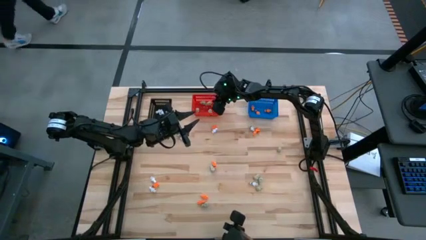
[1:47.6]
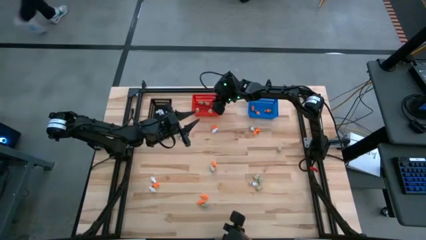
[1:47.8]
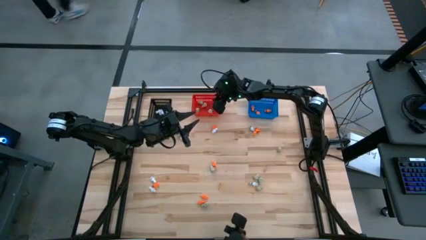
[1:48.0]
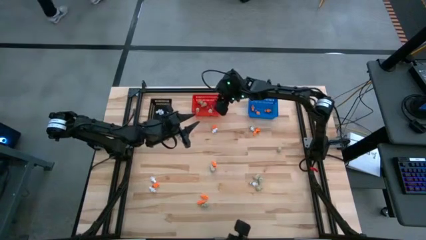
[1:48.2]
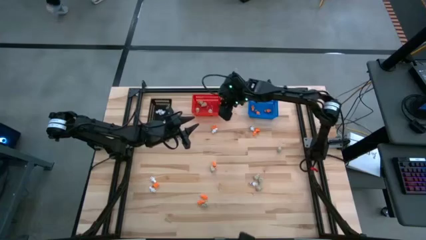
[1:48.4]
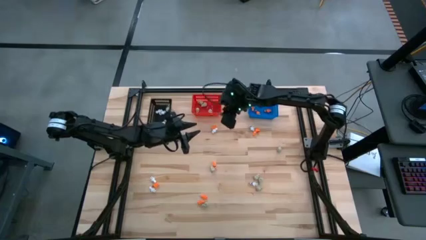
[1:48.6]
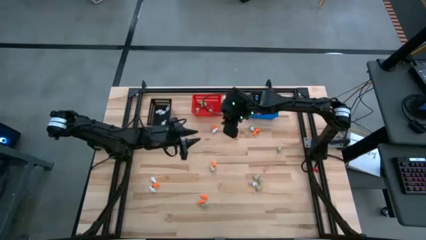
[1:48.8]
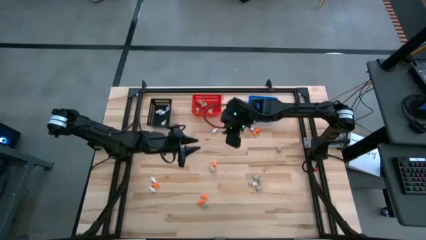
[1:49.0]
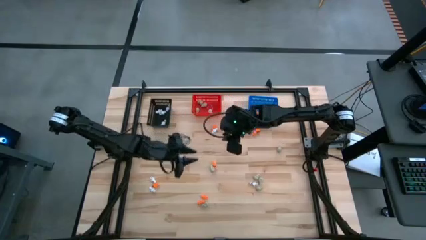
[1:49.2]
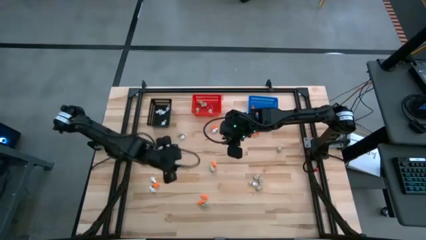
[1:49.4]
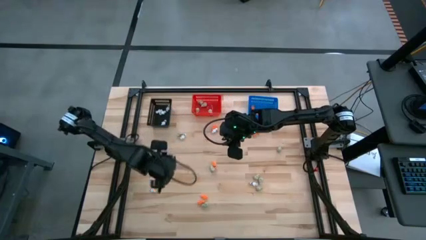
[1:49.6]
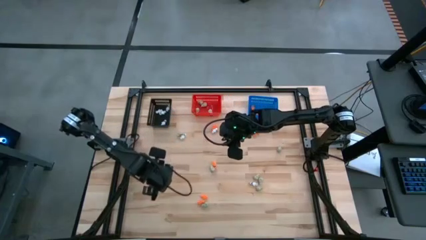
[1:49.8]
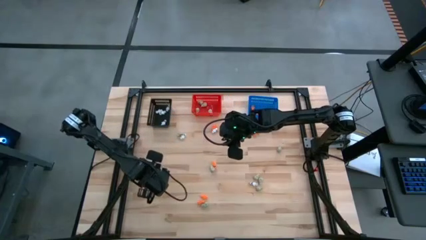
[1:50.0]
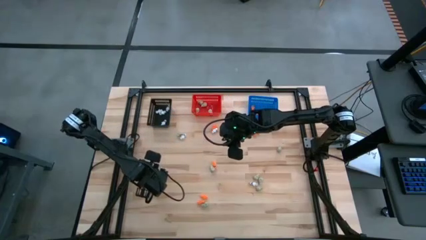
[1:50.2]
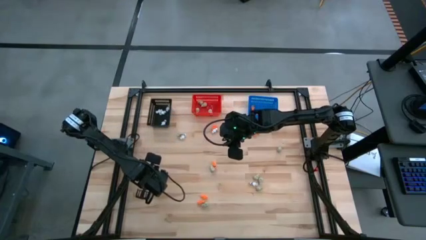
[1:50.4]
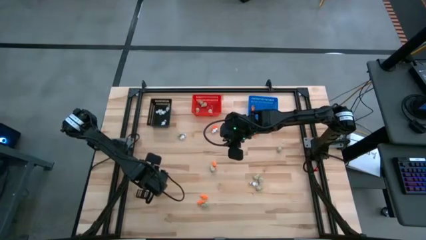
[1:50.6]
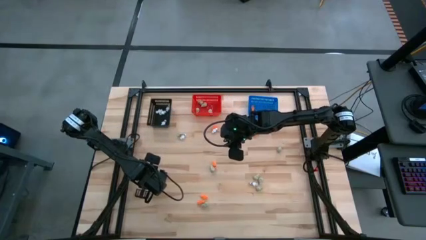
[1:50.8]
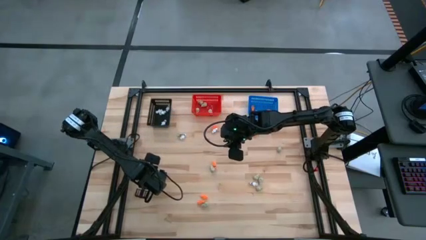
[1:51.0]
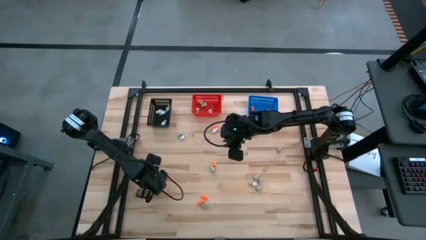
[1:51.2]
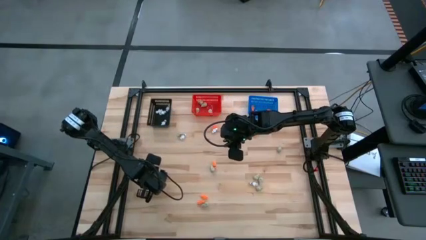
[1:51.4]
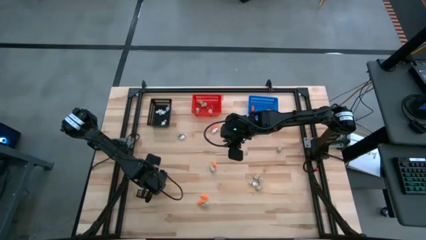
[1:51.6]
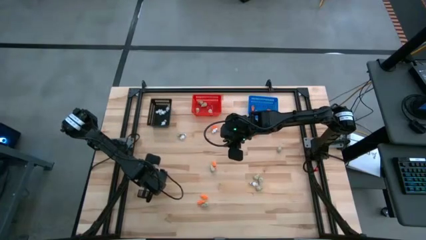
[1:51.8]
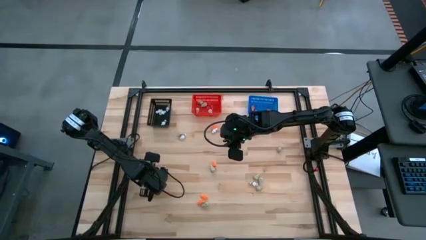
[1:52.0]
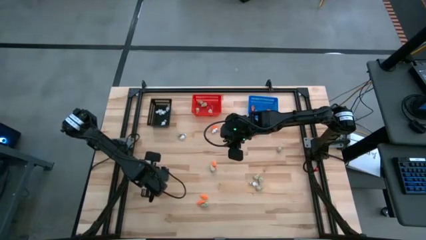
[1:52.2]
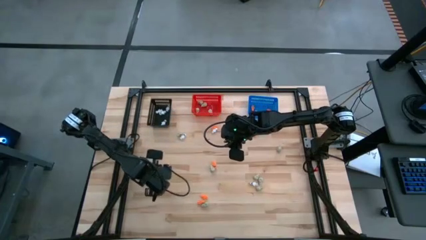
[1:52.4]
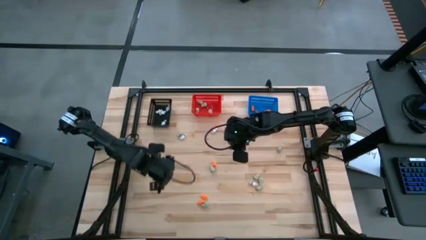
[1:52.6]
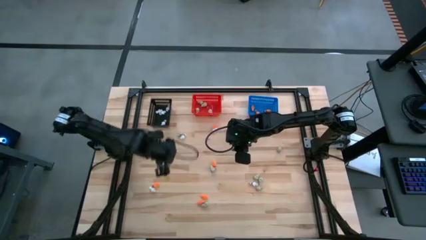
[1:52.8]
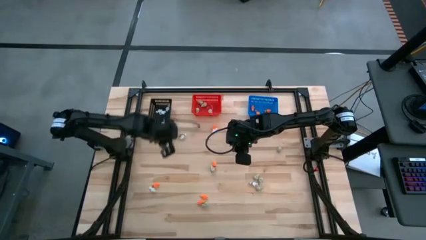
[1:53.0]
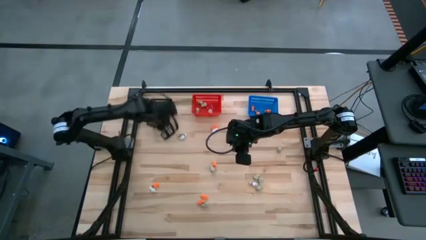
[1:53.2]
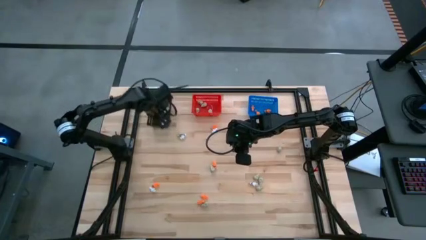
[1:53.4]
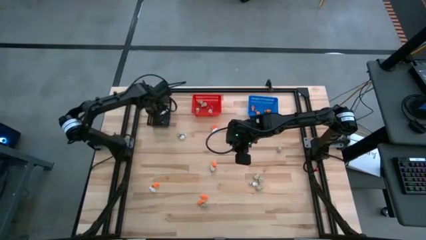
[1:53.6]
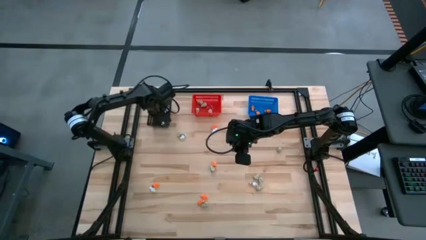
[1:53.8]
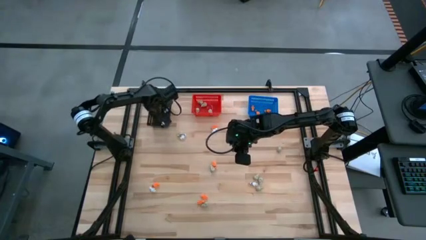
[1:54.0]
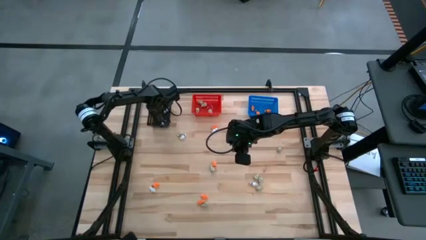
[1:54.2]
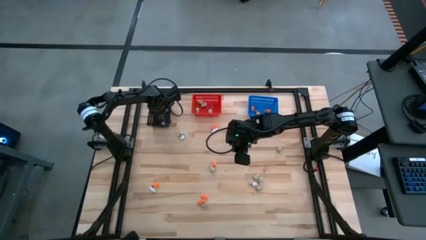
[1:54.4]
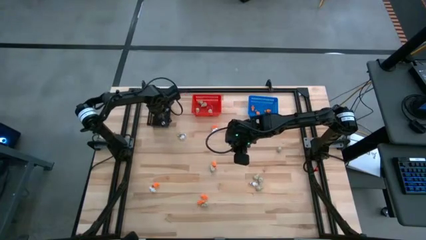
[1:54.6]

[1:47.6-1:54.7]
Task: Sort Halloween decoration
Put the white skeleton toy into the black bin

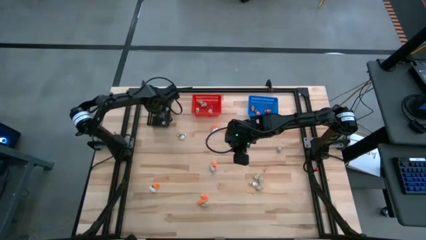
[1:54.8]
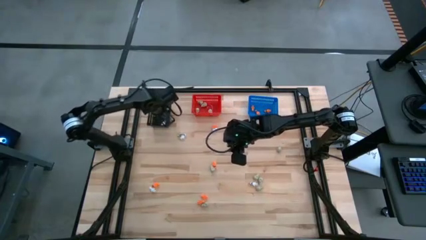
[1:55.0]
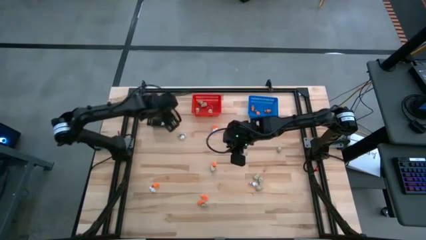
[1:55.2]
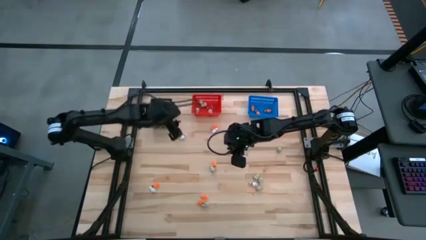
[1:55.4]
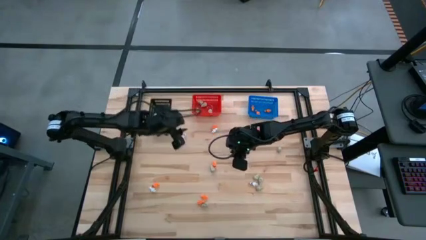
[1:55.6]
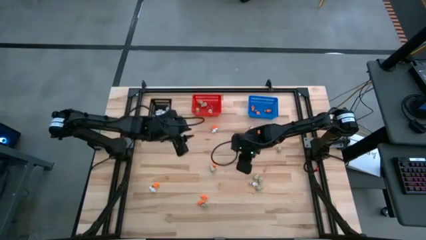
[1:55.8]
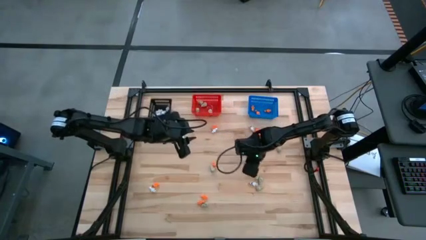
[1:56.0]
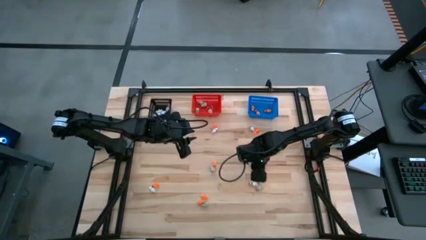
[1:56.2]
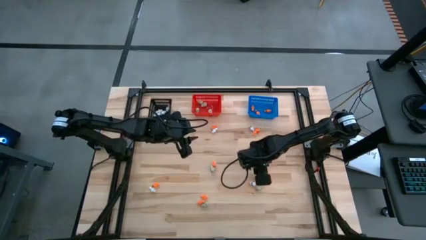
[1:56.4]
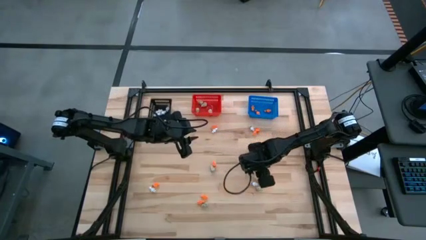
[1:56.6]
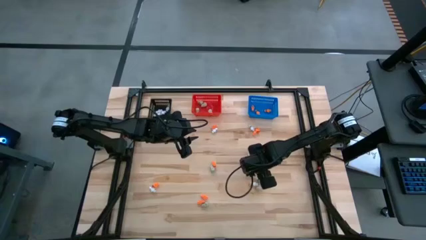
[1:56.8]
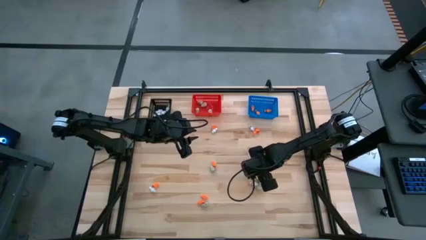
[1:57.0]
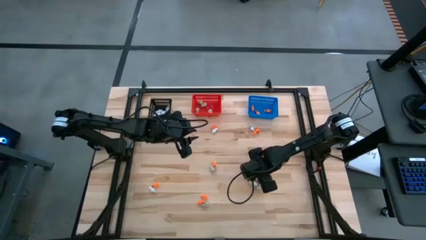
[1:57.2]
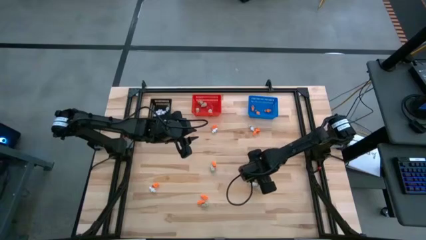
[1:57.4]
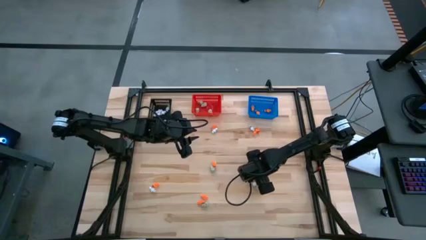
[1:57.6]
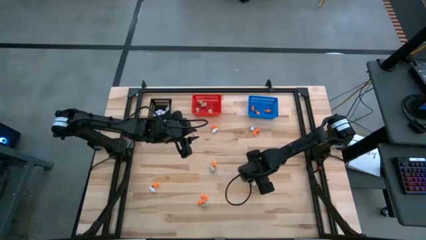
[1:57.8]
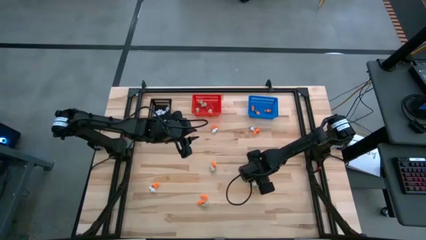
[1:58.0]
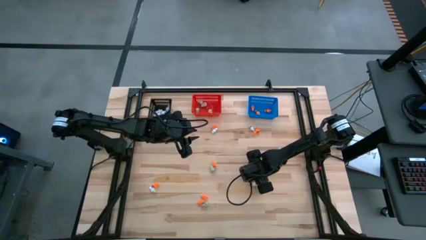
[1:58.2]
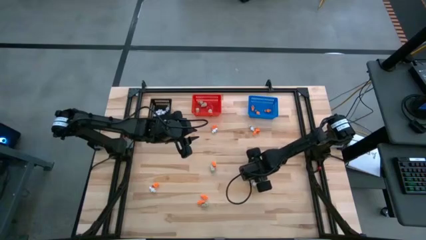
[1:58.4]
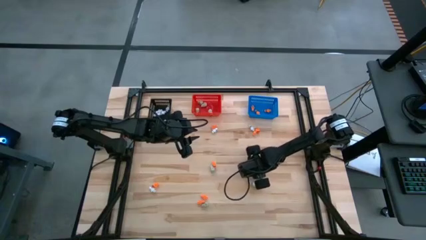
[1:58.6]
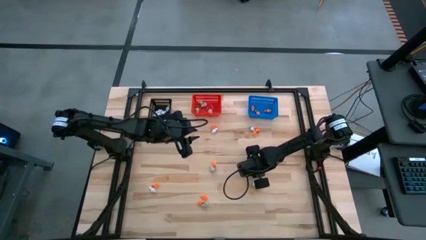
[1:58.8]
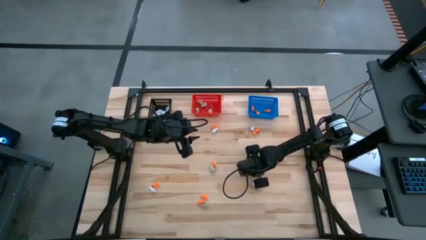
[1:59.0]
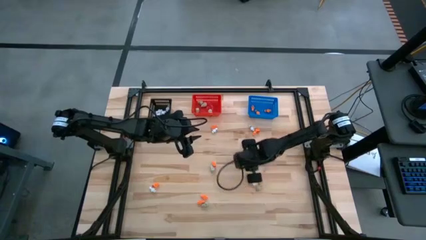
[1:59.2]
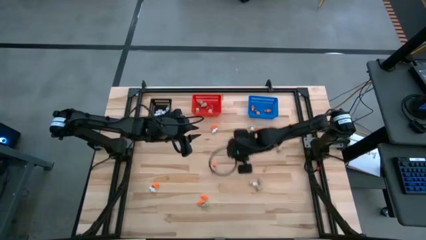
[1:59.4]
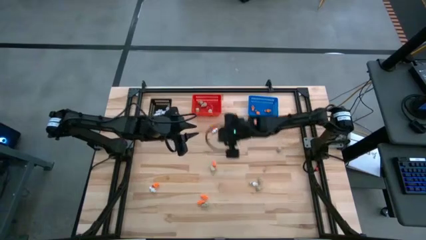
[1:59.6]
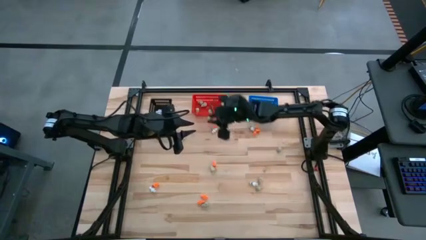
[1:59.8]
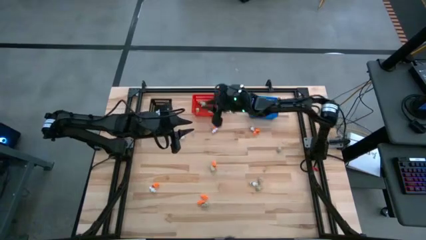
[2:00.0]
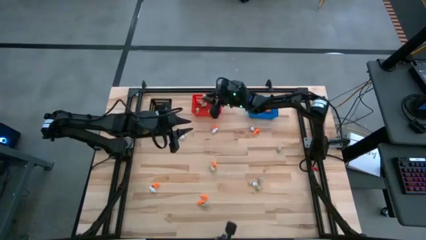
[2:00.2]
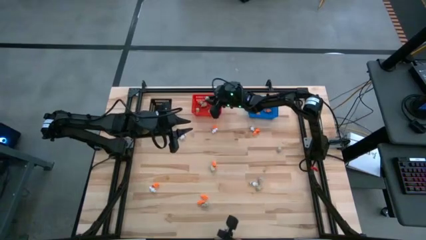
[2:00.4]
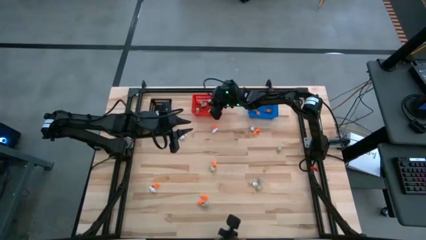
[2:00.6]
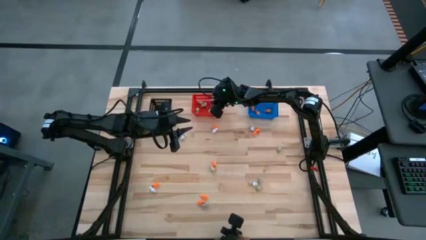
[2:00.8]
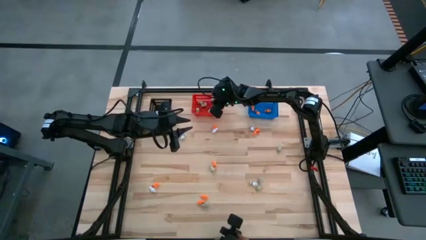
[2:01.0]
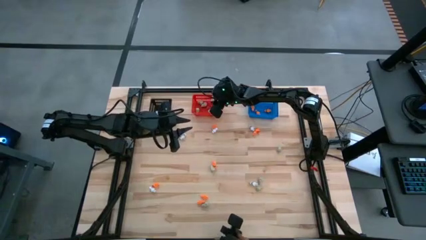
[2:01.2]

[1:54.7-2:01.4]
Put the white skull toy into the red bin
